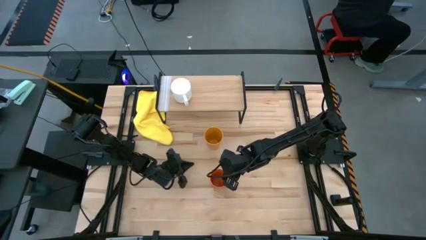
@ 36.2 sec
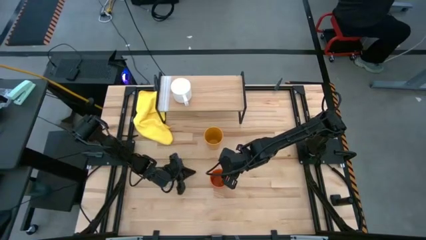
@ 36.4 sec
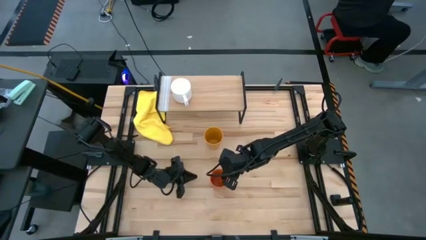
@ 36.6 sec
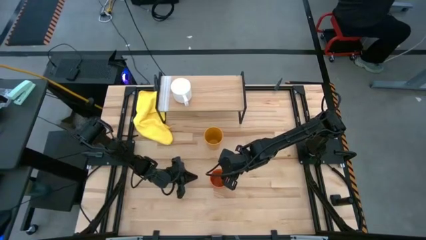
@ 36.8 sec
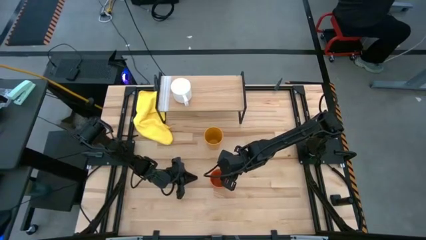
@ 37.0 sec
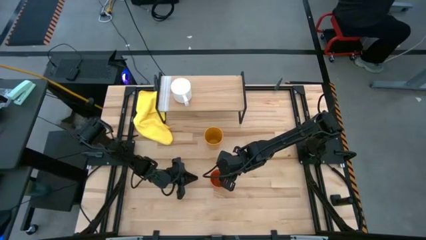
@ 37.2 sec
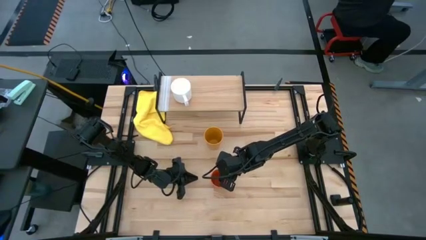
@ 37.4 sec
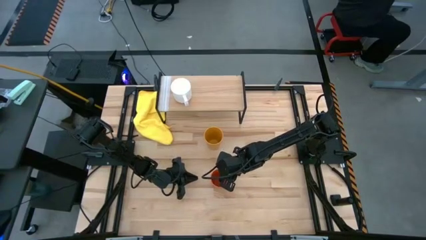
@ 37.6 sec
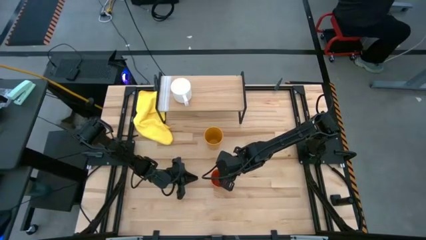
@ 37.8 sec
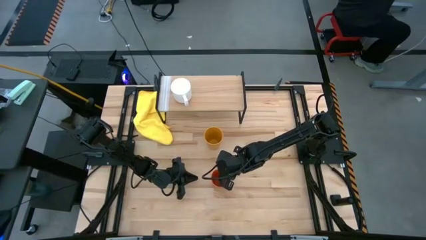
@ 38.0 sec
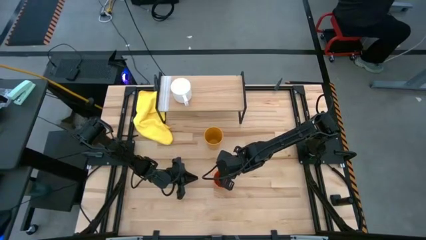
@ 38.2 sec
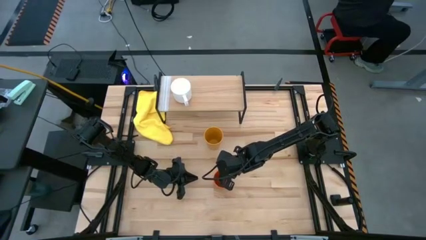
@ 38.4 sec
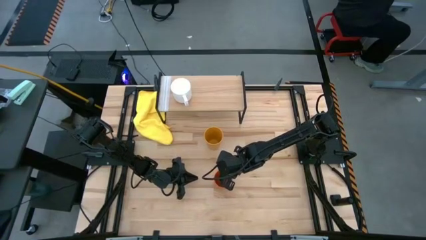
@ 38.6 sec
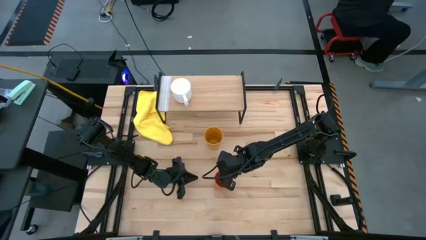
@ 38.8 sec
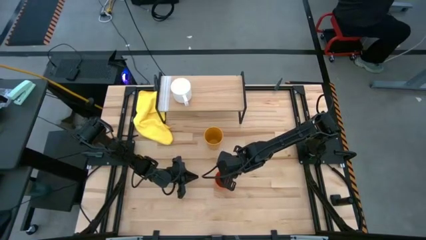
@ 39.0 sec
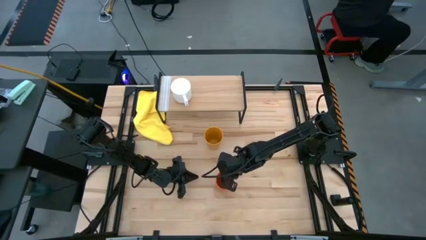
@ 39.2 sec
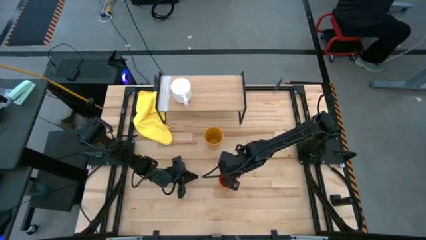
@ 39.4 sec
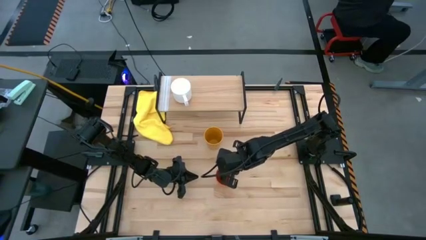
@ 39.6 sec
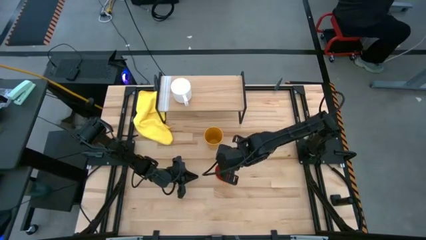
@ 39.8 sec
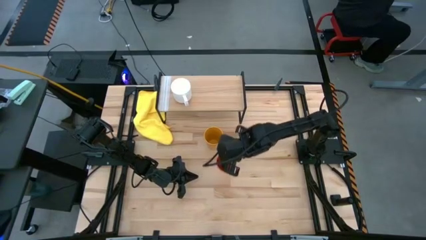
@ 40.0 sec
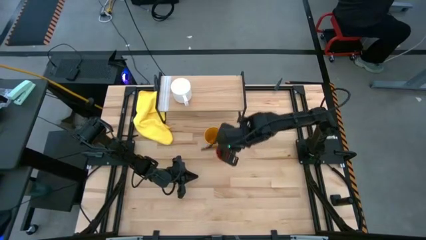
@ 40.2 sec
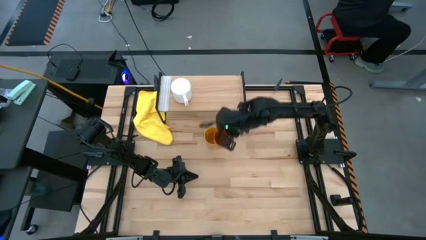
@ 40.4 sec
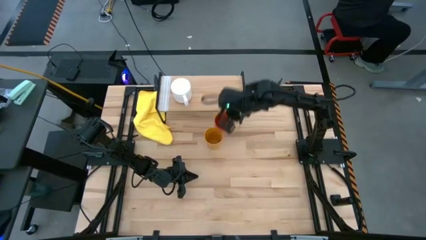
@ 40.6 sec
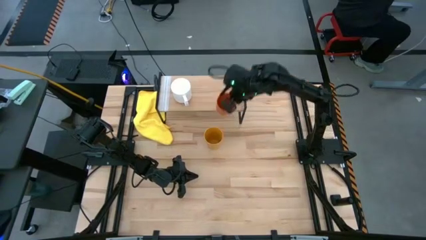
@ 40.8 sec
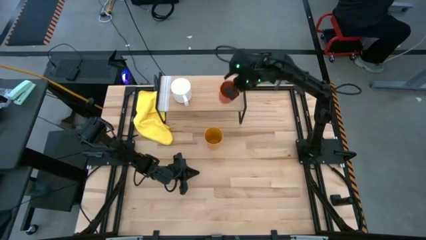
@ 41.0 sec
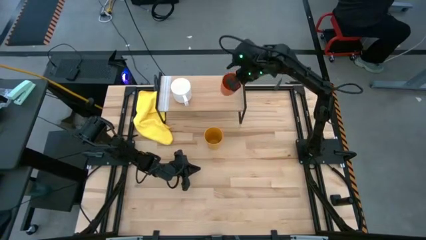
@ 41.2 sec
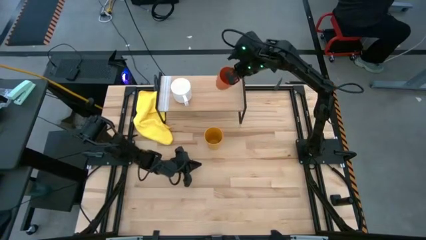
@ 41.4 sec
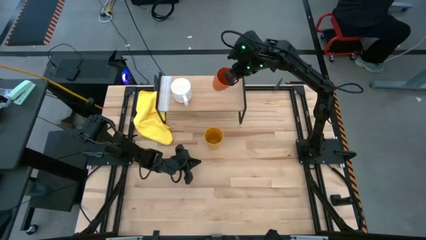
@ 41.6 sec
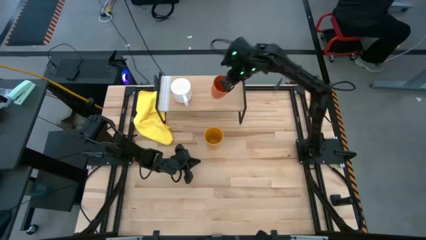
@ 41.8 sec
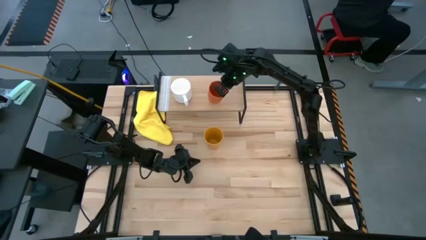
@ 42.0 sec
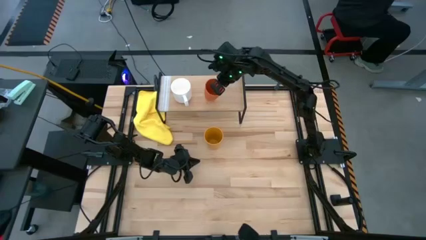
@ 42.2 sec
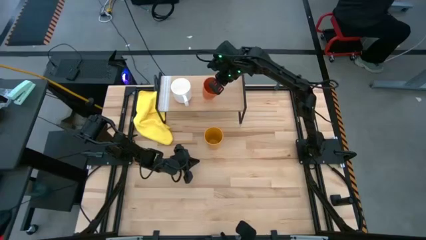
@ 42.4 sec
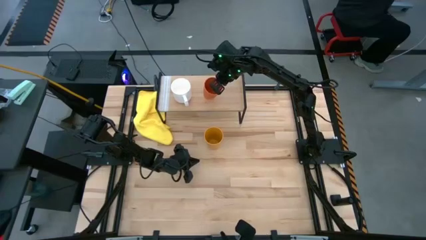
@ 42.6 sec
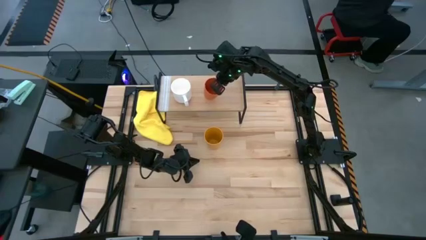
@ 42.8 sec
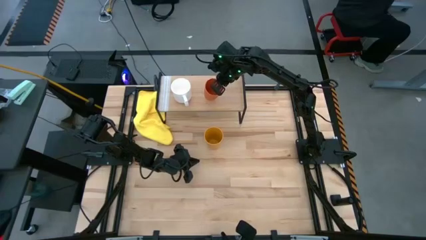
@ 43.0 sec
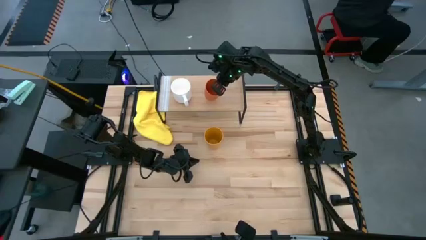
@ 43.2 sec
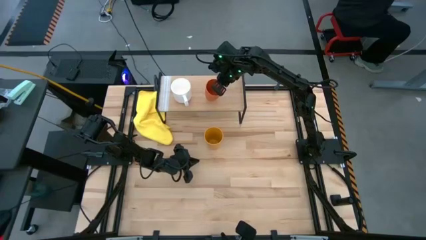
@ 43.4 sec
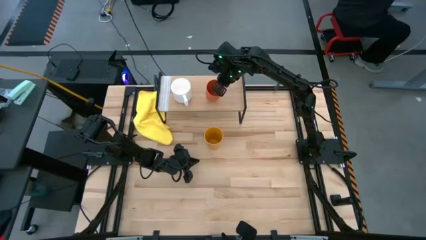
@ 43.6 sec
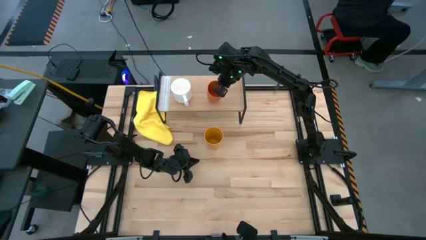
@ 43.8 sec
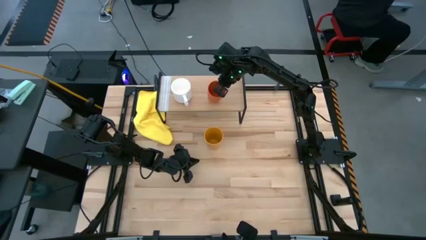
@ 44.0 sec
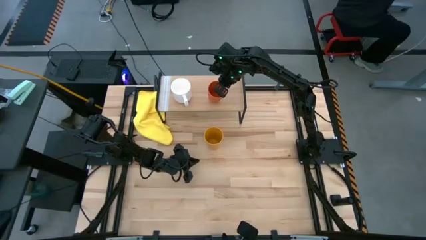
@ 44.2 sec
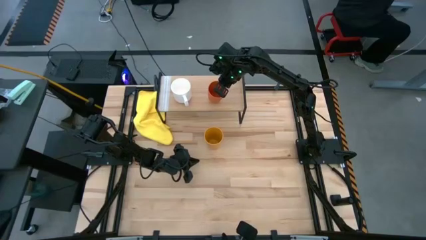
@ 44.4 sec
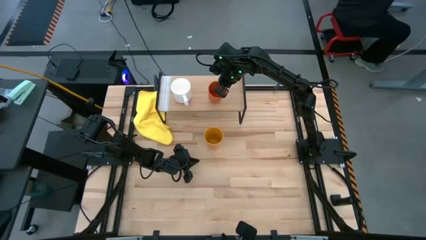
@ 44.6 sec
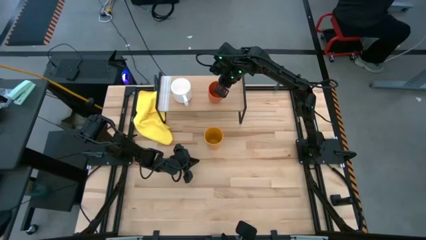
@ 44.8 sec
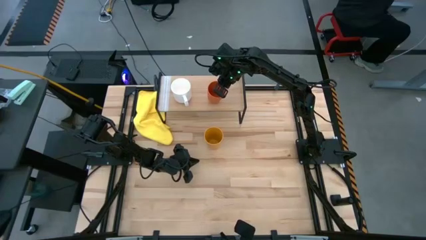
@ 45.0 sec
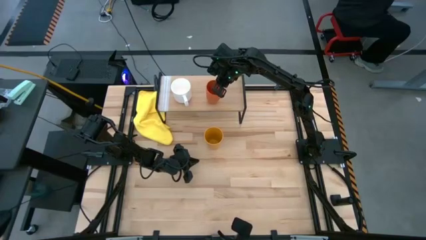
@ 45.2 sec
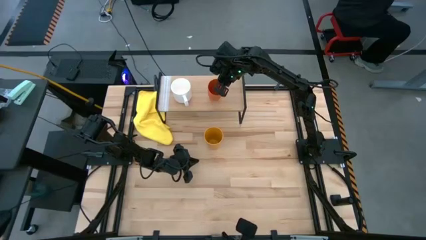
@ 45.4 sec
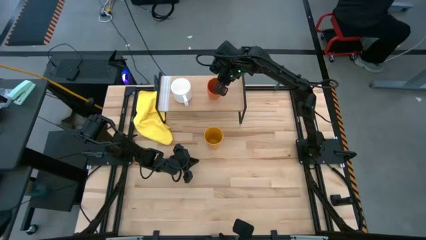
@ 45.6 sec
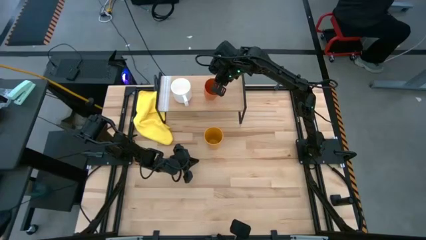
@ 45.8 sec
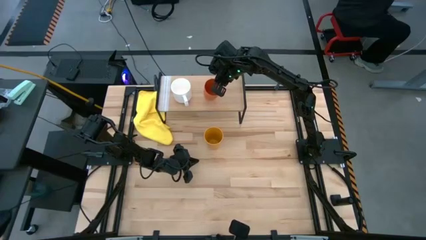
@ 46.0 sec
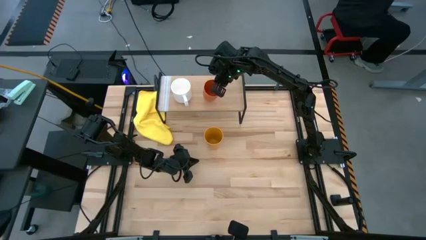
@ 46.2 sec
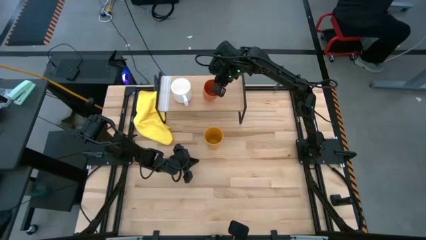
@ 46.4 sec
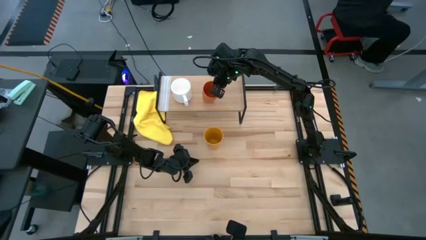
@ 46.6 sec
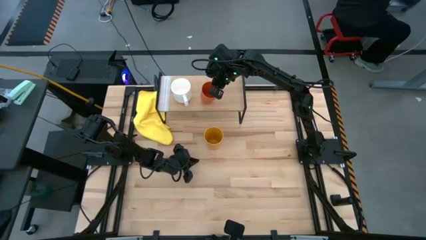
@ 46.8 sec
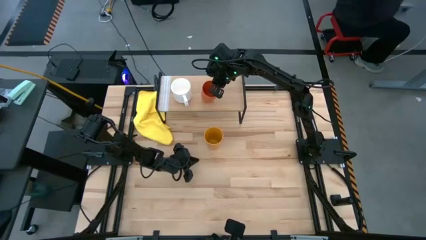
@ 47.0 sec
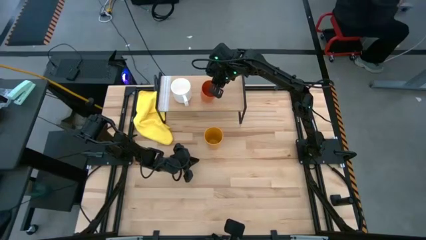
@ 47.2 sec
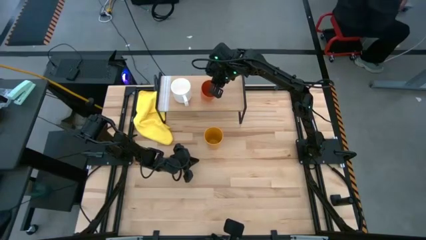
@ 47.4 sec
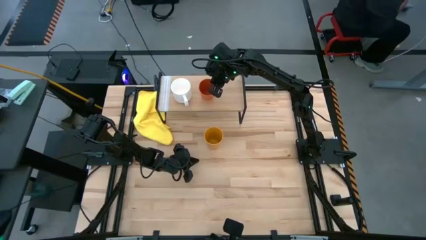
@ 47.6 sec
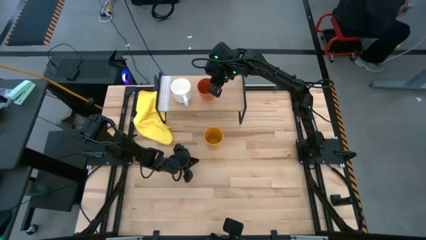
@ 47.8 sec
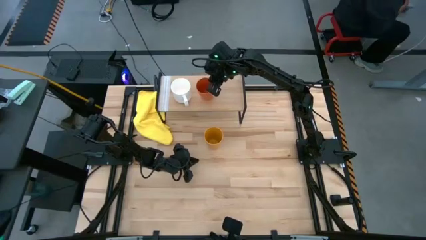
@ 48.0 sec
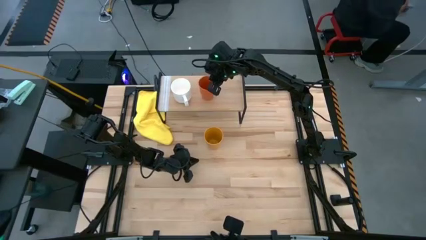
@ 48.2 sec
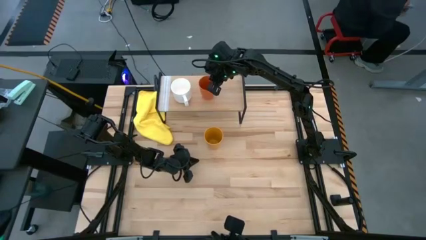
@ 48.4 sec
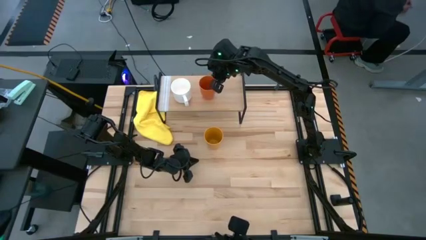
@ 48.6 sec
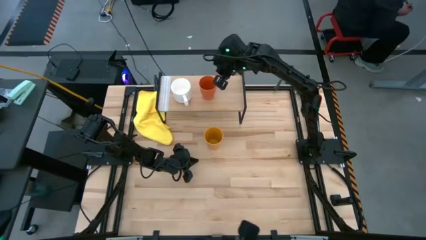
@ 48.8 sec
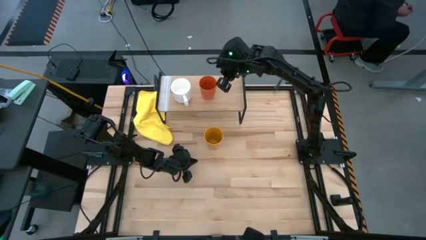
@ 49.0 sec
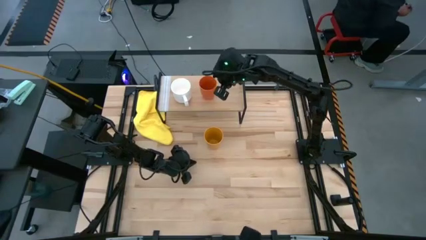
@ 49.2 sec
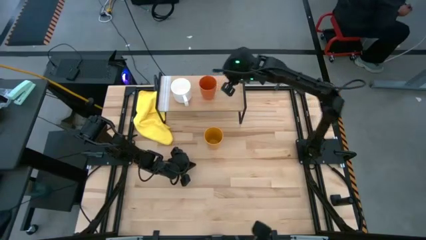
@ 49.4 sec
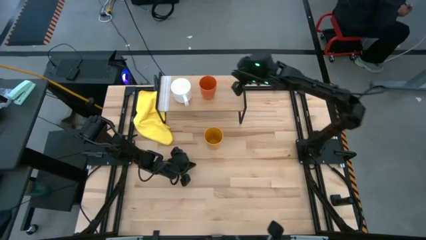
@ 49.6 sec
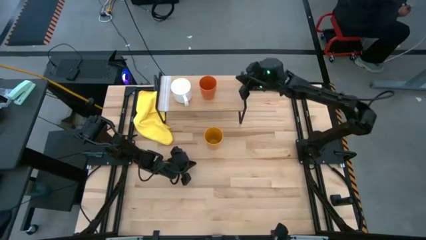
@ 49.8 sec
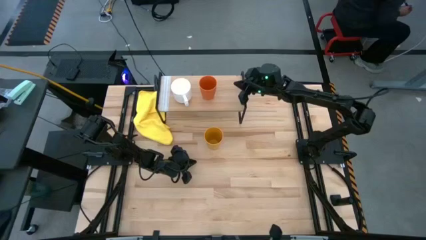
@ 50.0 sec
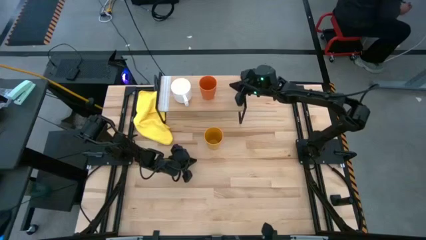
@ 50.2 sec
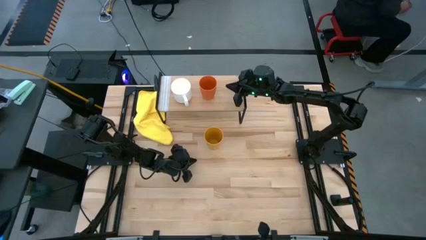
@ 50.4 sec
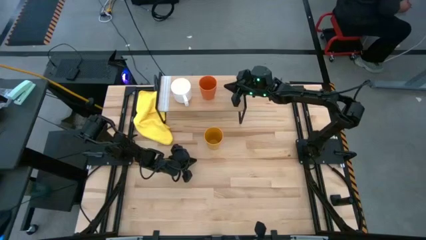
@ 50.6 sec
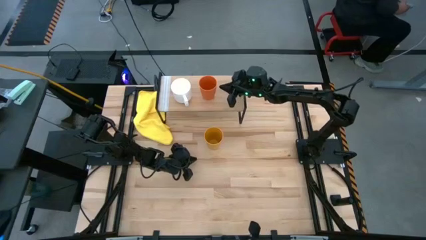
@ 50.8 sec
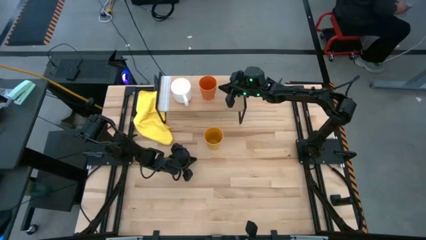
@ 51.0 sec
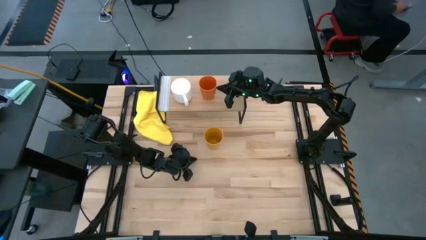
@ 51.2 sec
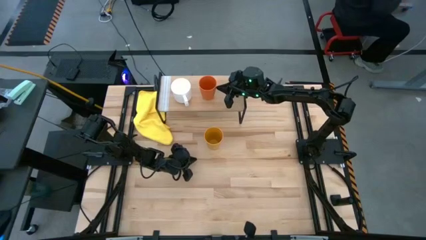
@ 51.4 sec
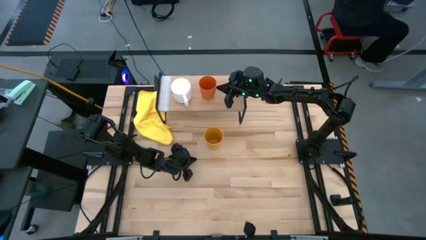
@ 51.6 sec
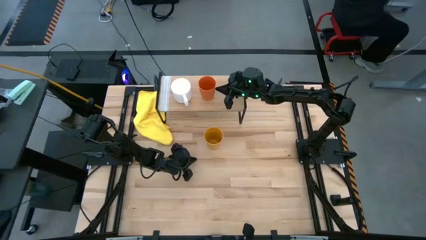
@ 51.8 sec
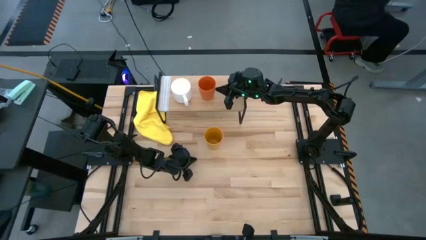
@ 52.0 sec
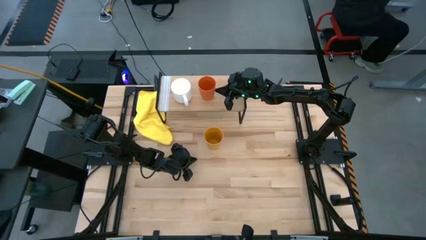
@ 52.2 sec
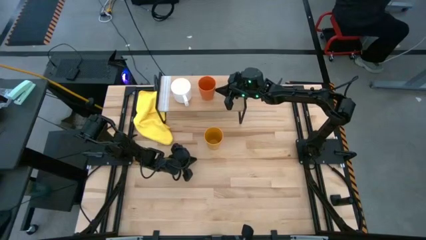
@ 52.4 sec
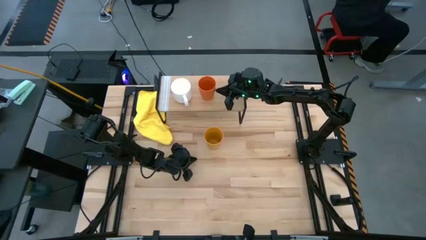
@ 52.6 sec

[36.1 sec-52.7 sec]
Task: Stack small to large cups/mugs on shelf
Put the orange cup on the shelf
